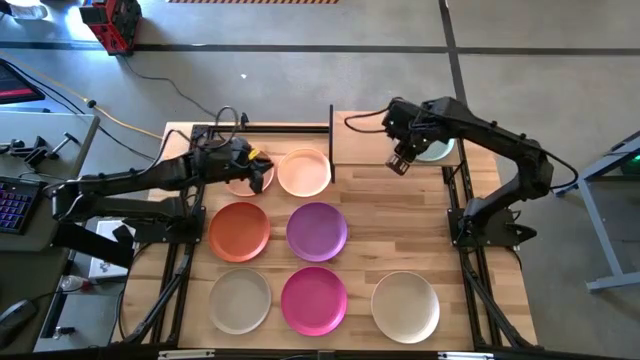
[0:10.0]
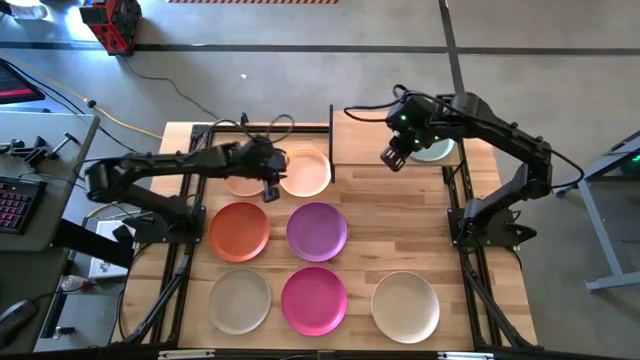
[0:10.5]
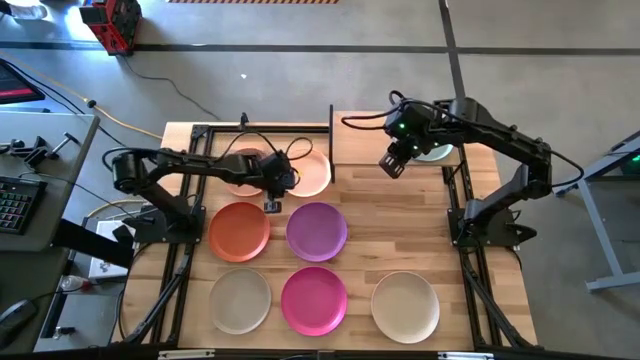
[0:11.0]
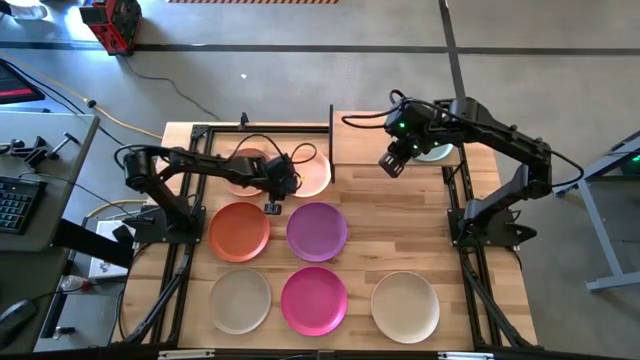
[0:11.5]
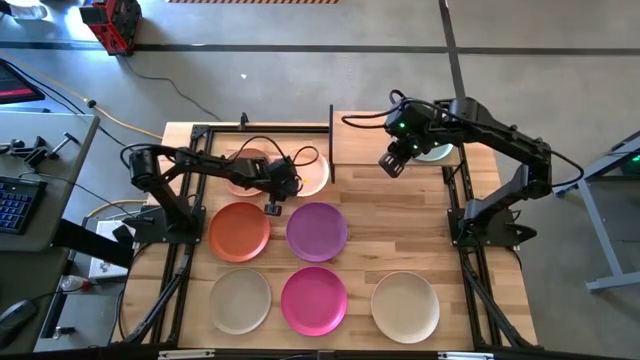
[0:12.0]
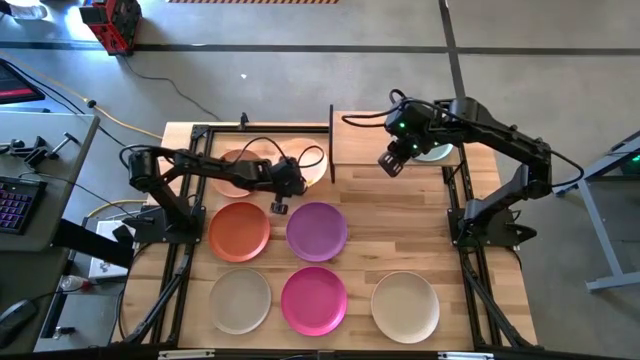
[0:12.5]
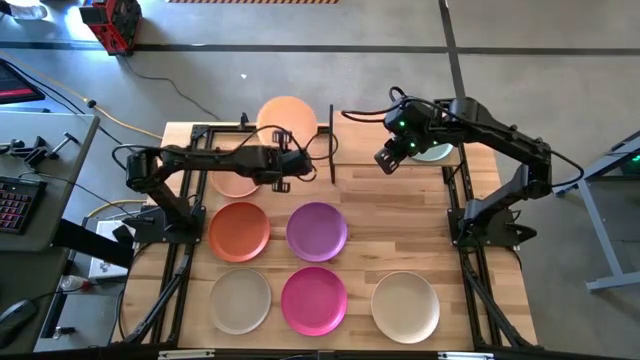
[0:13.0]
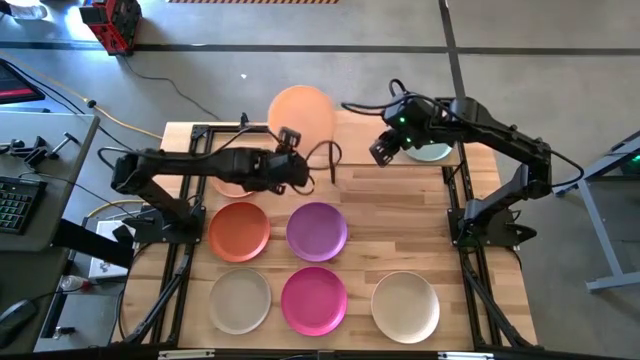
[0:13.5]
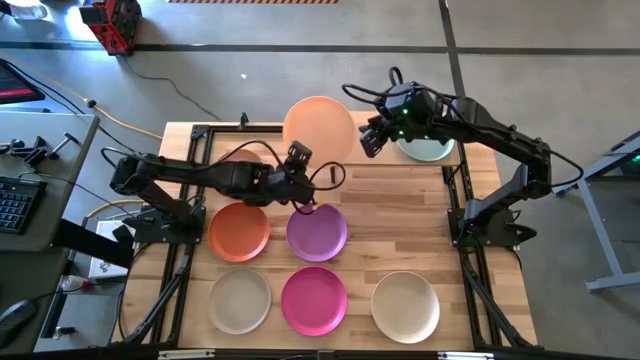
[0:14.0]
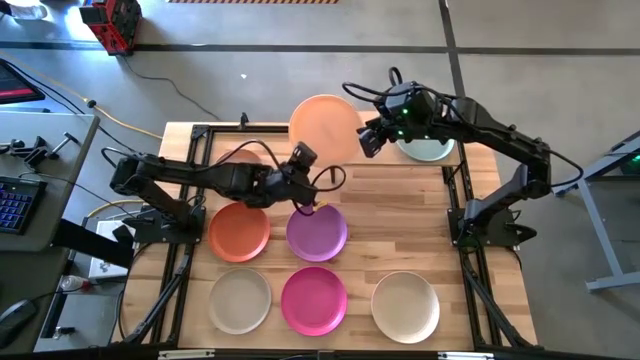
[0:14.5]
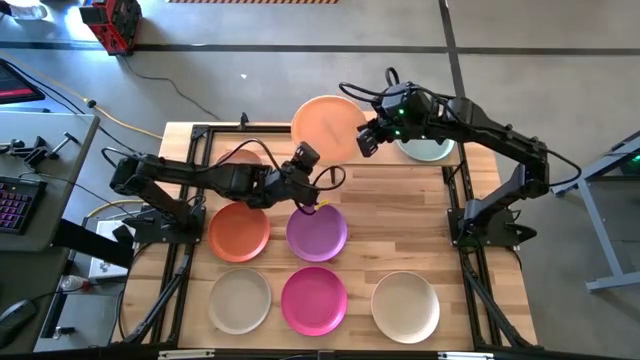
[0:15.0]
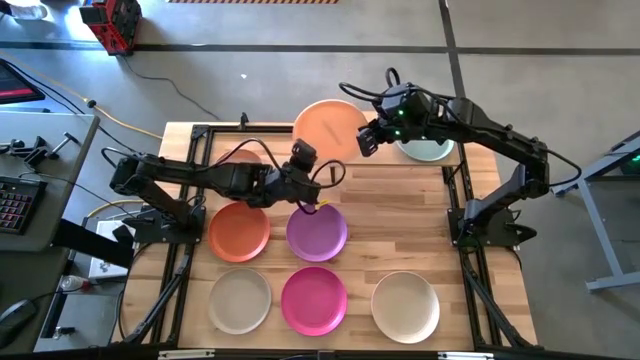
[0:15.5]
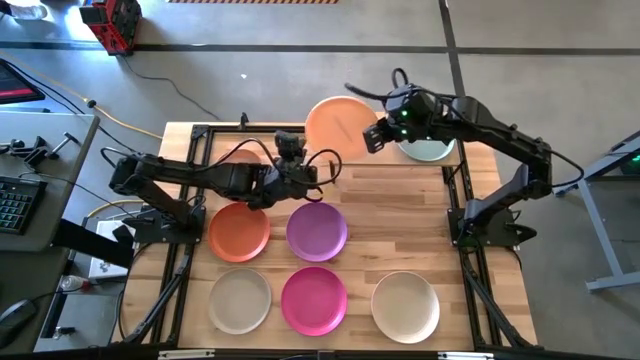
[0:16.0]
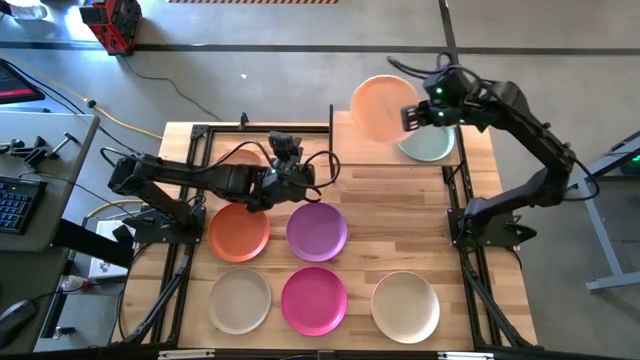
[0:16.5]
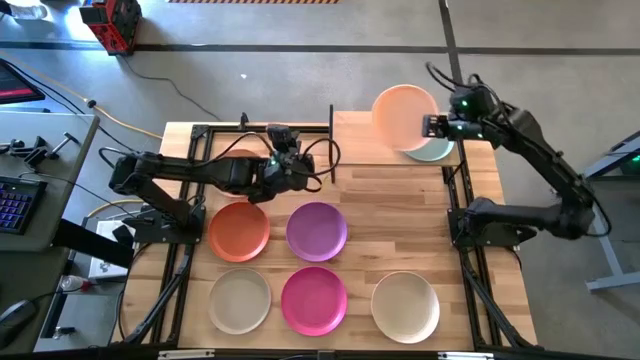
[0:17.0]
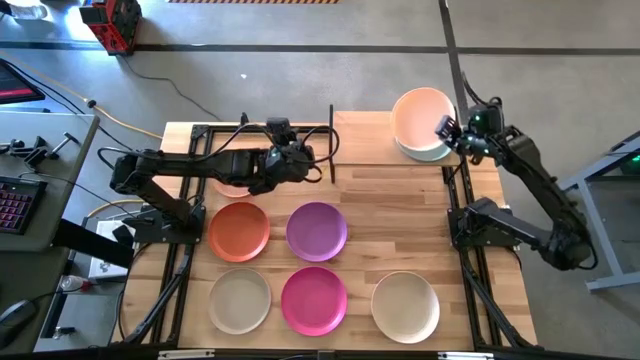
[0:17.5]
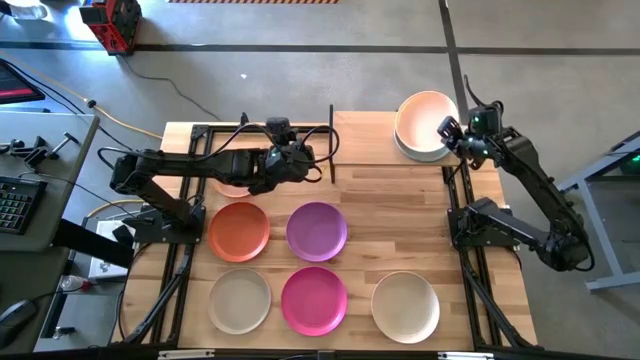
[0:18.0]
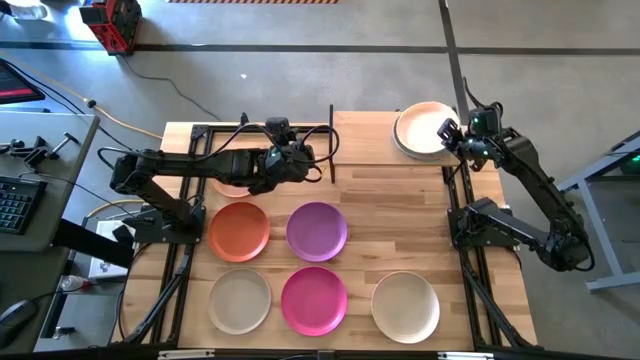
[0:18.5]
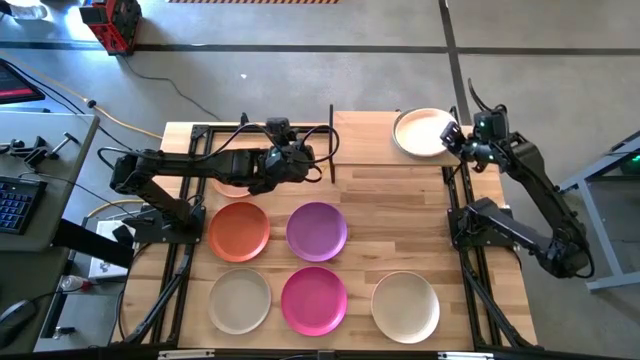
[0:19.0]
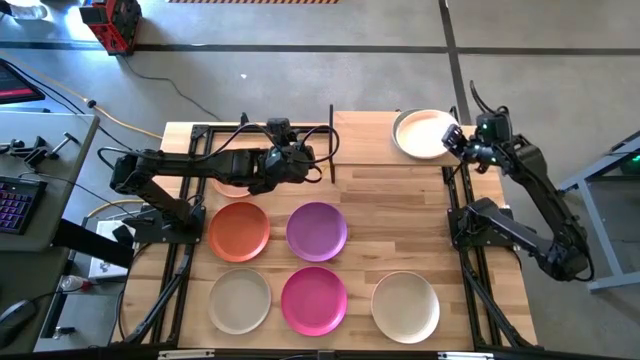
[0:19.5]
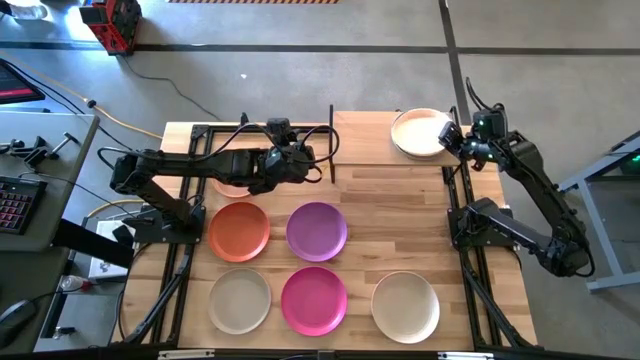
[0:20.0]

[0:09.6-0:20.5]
Task: Place and stack plates onto a shelf
Stack the light orange plate on top of the blue plate on the shelf

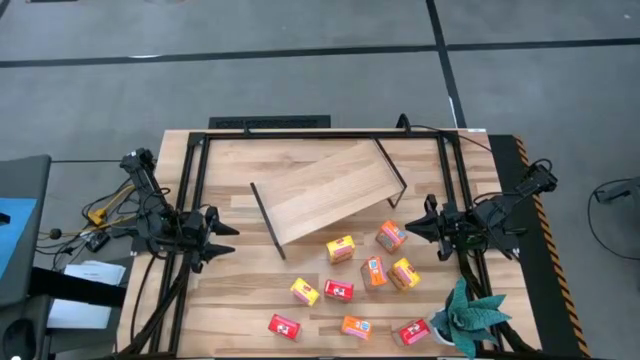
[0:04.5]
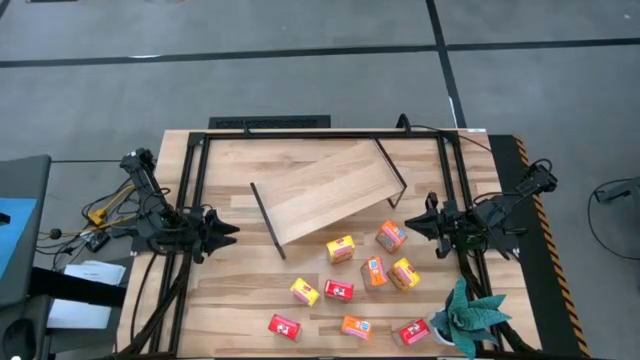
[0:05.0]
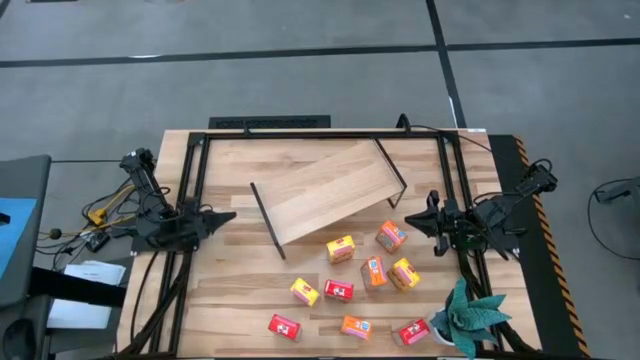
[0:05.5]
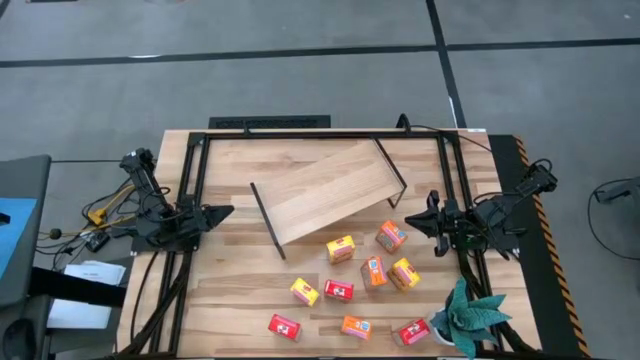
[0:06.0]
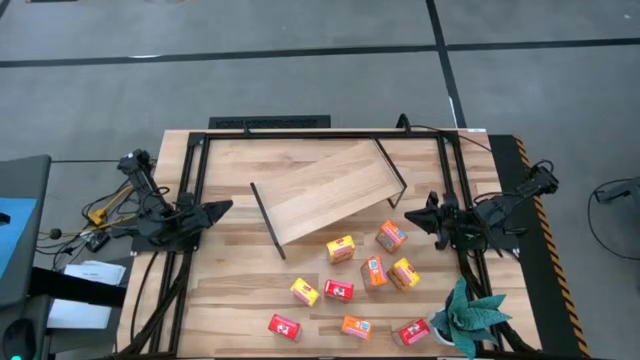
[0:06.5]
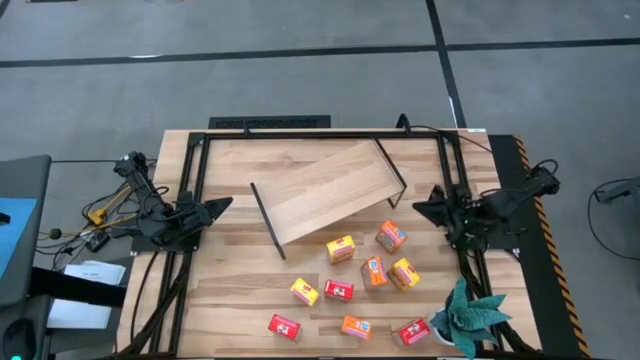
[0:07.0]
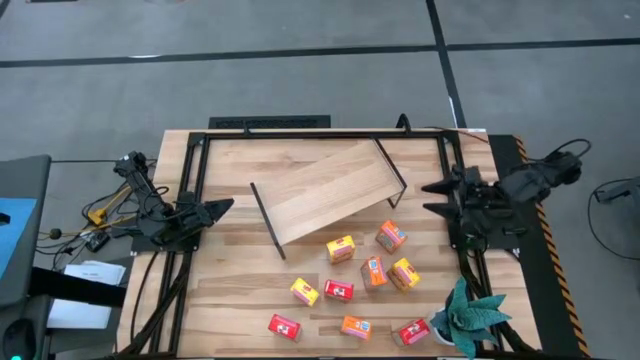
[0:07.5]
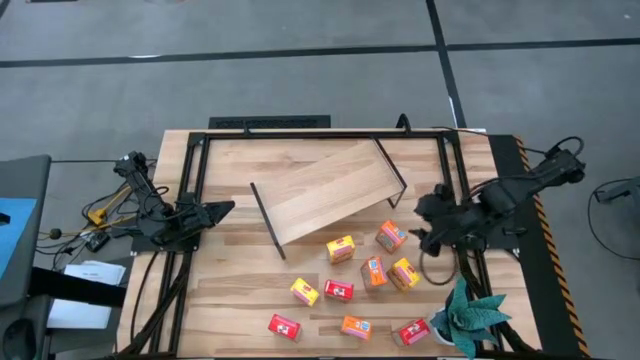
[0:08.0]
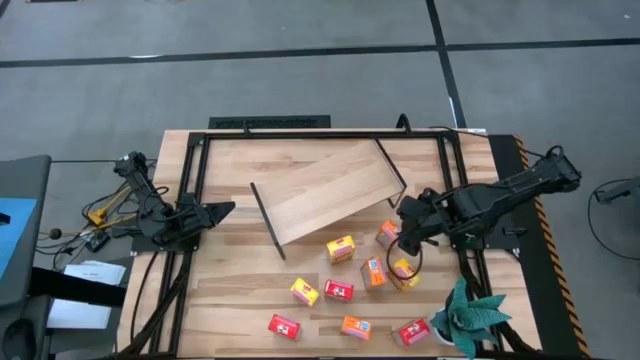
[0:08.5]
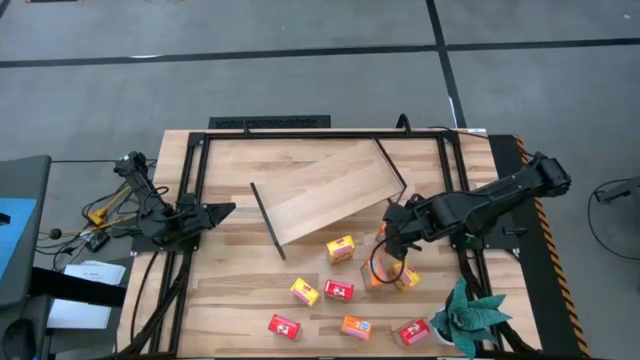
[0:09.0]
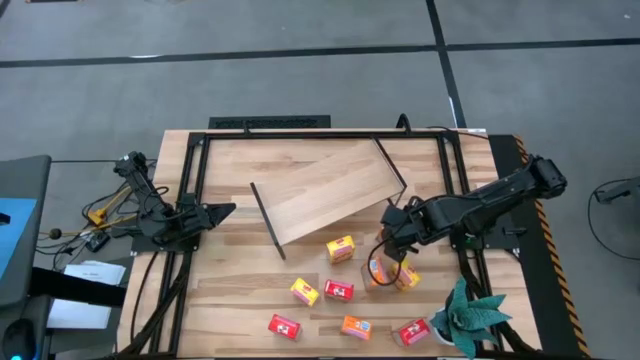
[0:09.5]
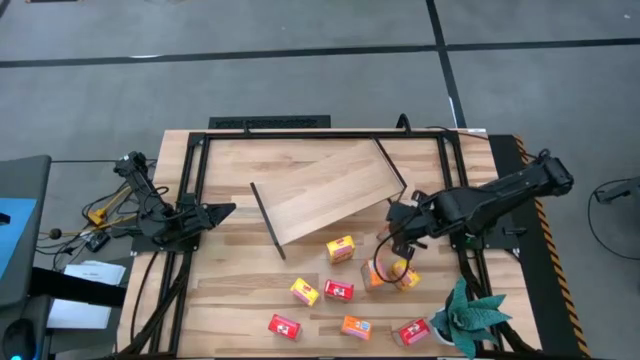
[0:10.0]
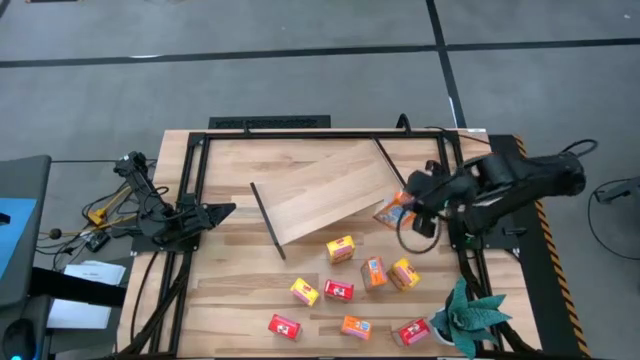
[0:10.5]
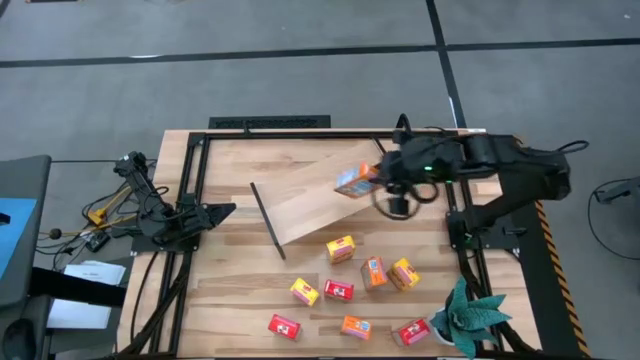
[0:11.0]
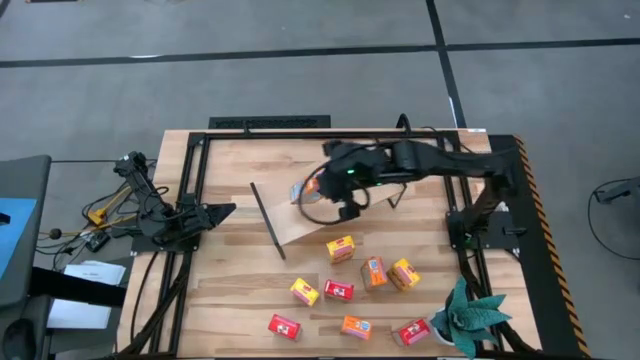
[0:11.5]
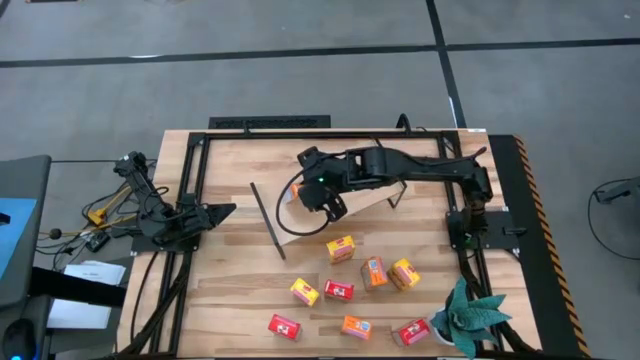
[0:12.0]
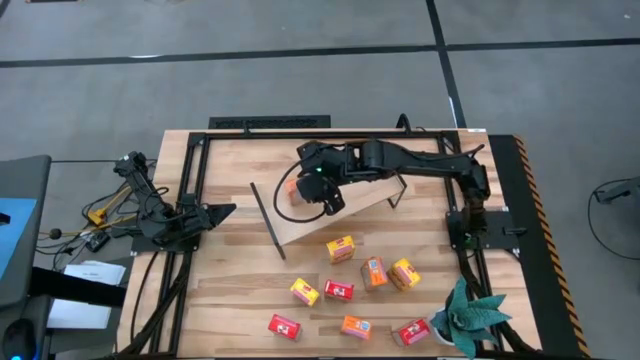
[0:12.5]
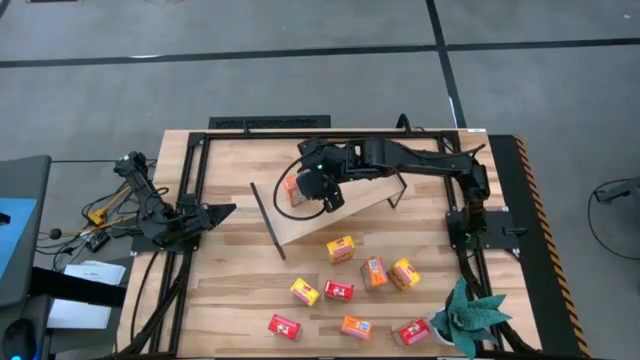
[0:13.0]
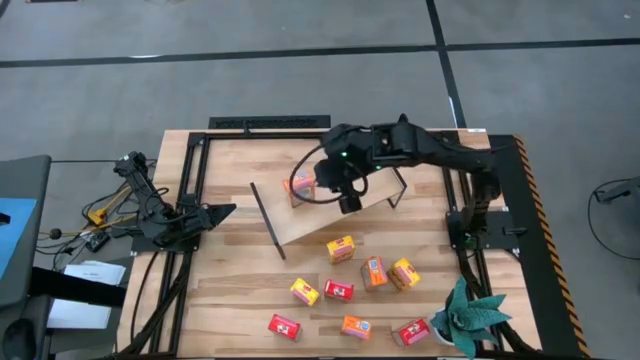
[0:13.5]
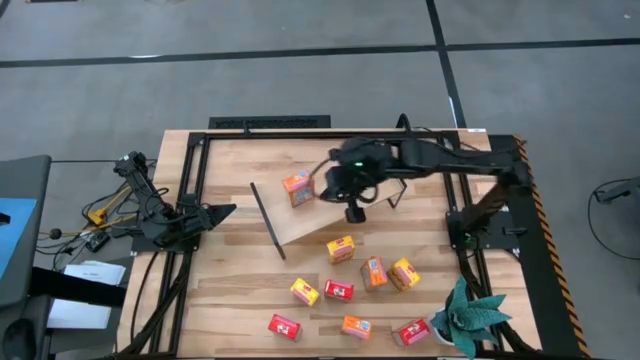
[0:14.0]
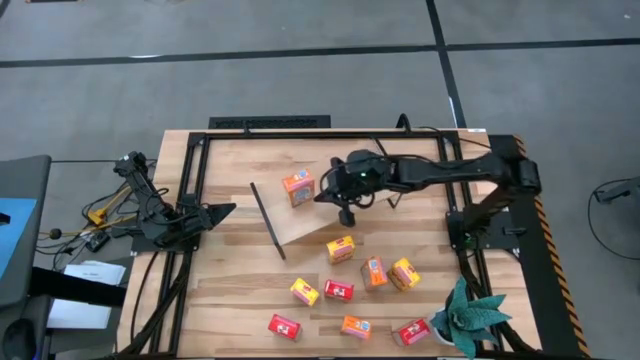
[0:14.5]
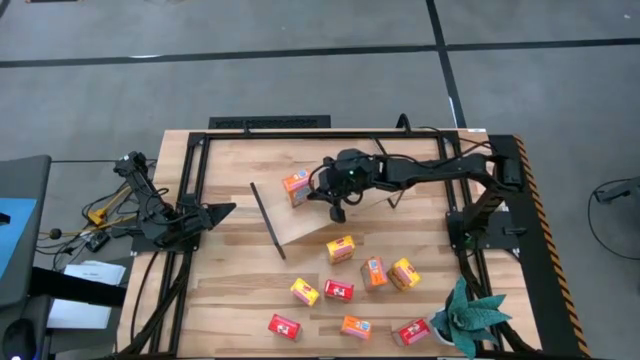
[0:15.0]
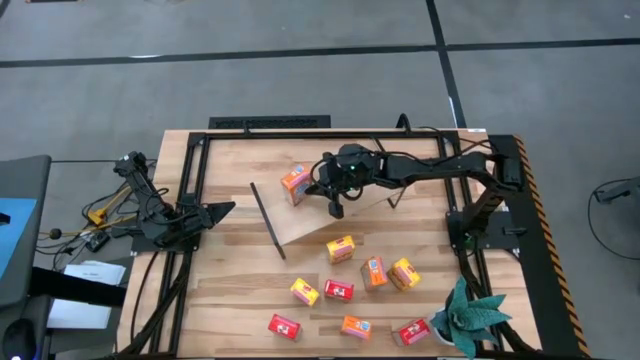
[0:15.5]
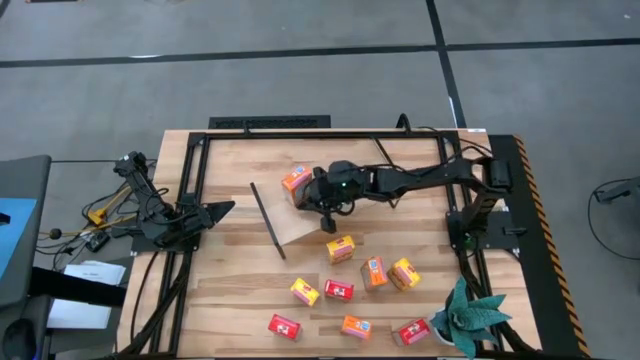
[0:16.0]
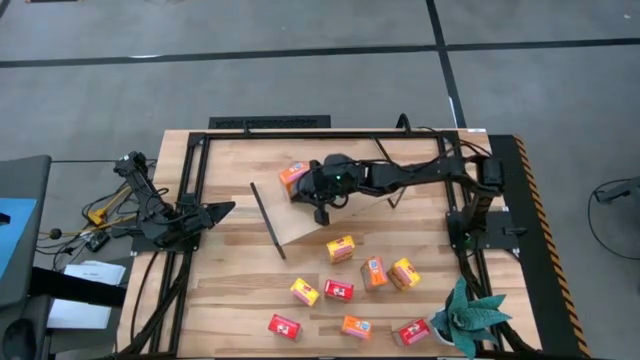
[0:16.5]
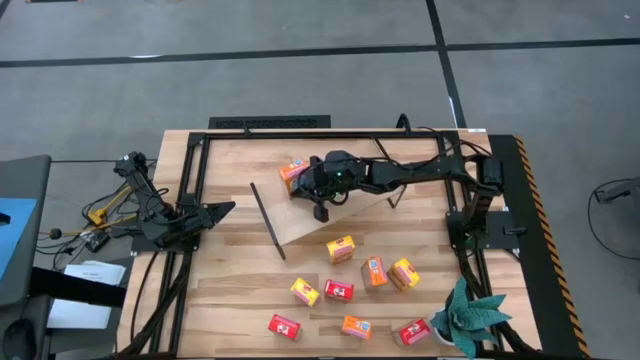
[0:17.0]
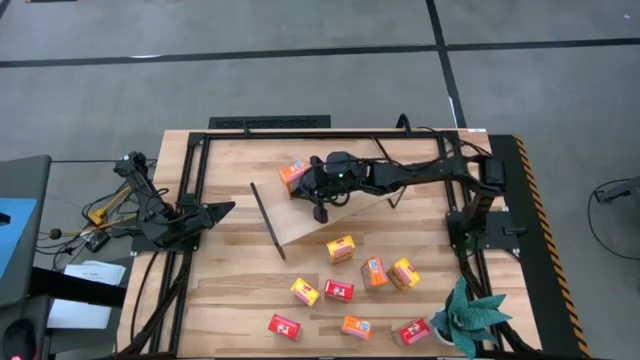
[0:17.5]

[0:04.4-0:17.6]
Task: Stack cereal on shelf
Put the top orange cereal box on the shelf
